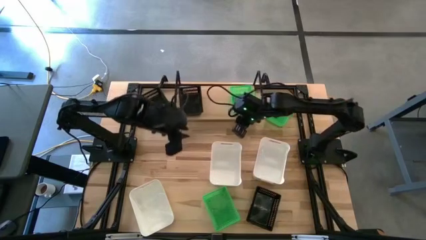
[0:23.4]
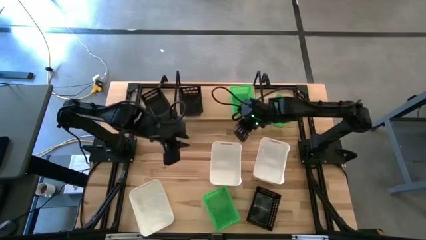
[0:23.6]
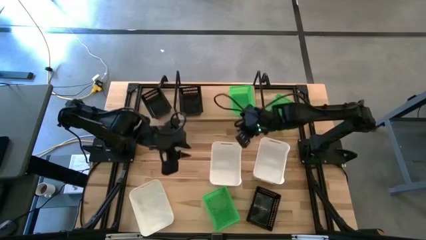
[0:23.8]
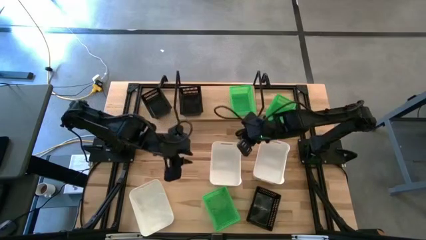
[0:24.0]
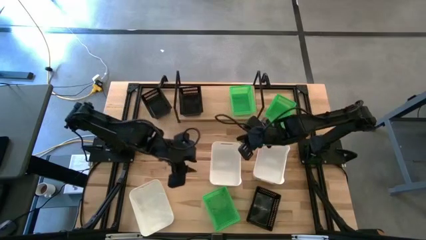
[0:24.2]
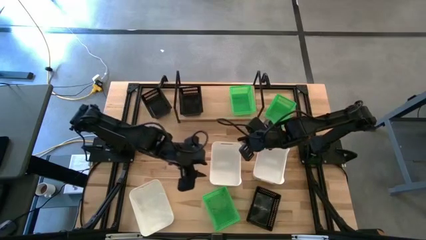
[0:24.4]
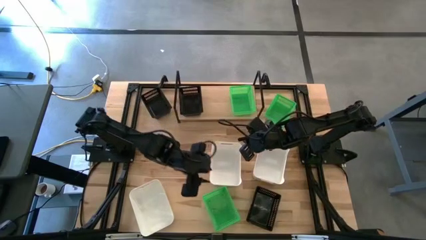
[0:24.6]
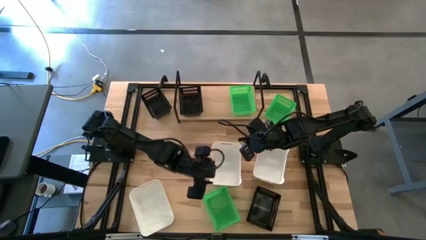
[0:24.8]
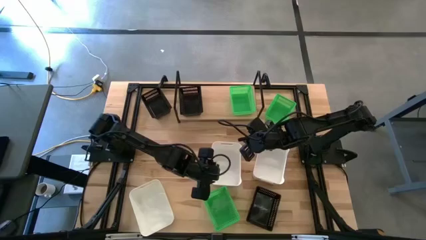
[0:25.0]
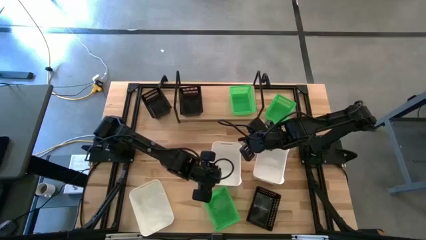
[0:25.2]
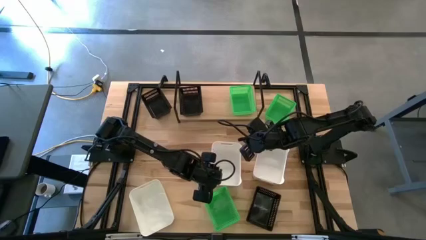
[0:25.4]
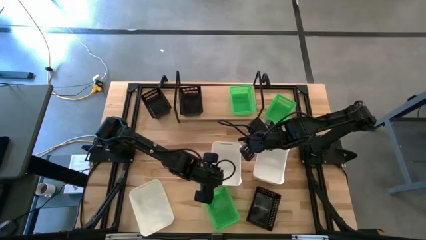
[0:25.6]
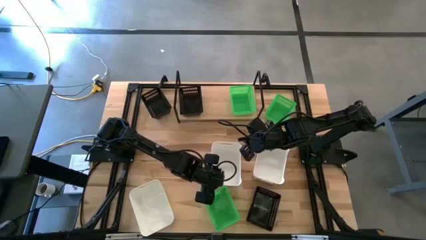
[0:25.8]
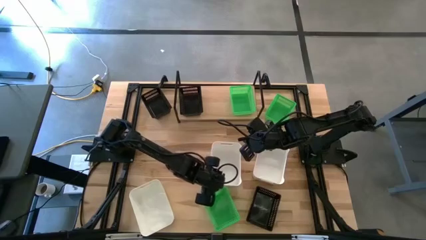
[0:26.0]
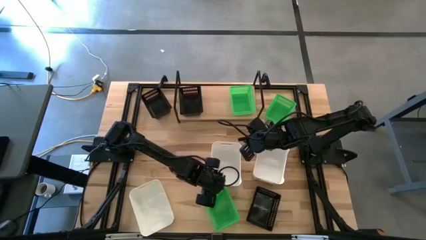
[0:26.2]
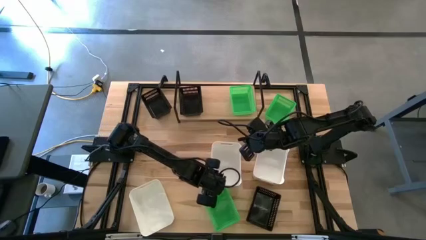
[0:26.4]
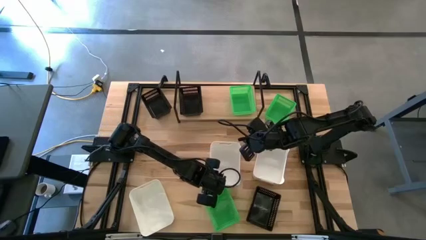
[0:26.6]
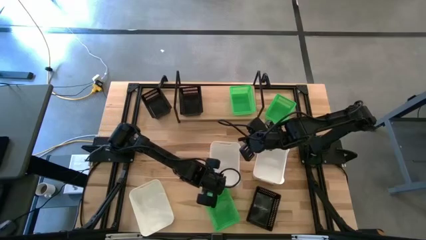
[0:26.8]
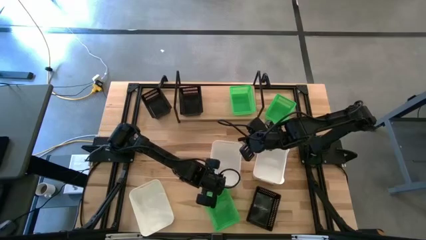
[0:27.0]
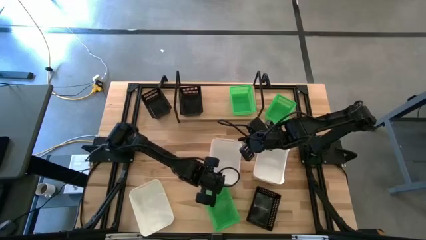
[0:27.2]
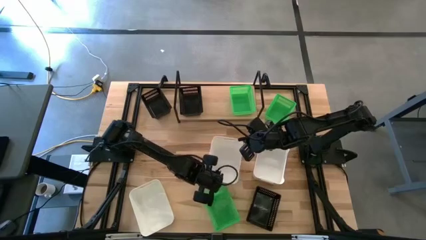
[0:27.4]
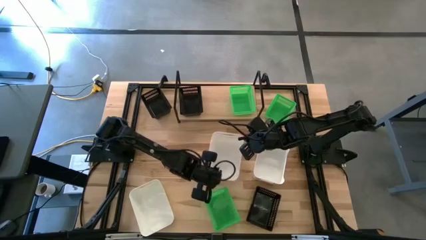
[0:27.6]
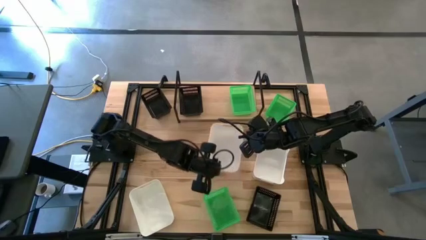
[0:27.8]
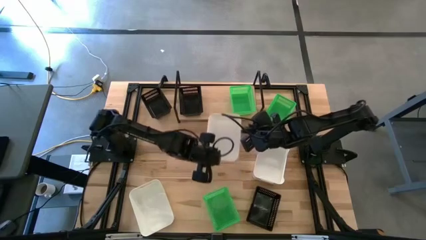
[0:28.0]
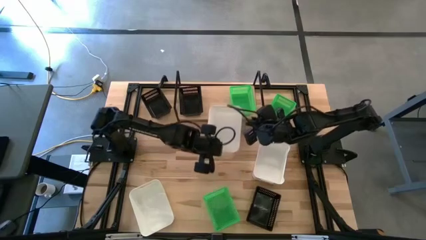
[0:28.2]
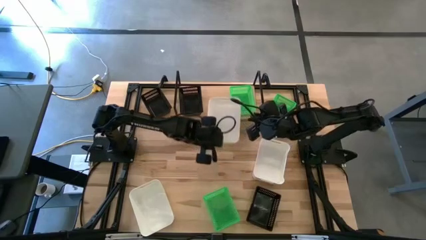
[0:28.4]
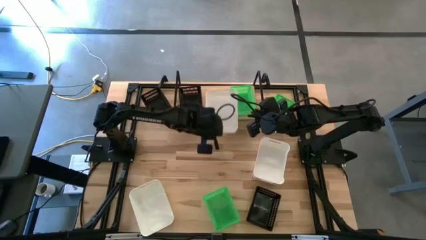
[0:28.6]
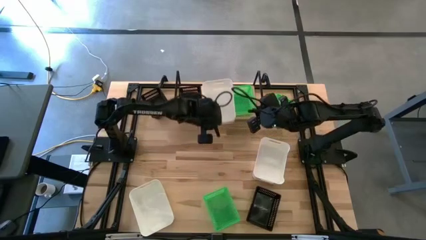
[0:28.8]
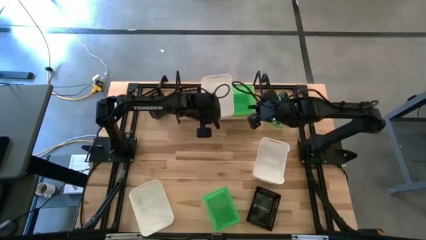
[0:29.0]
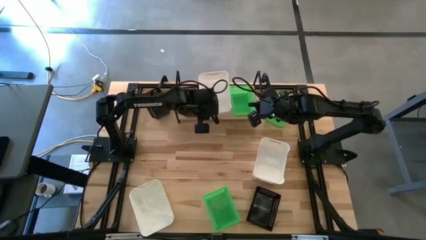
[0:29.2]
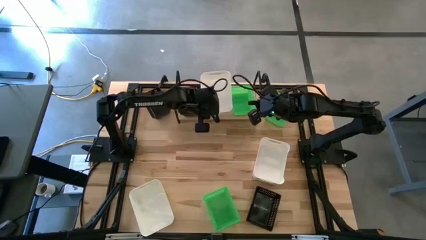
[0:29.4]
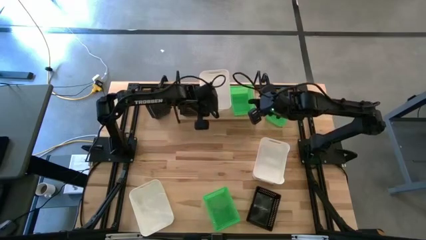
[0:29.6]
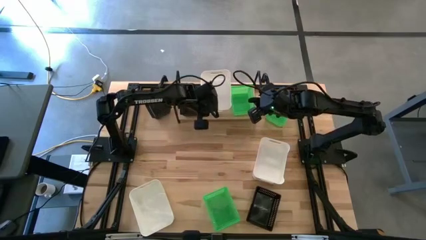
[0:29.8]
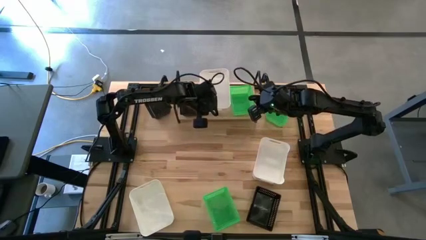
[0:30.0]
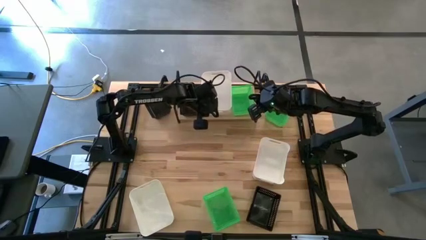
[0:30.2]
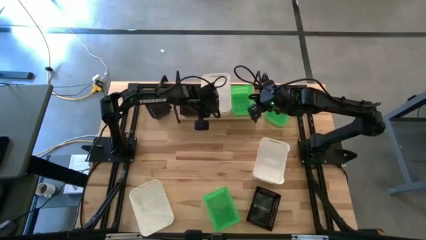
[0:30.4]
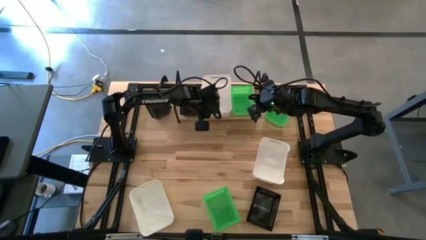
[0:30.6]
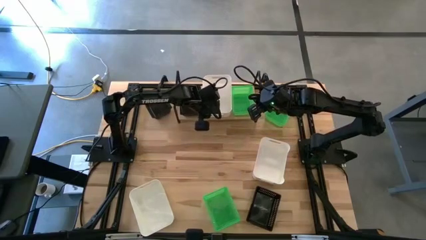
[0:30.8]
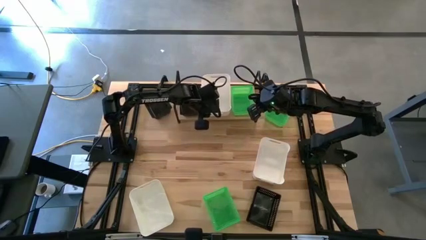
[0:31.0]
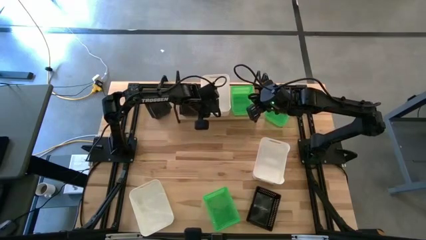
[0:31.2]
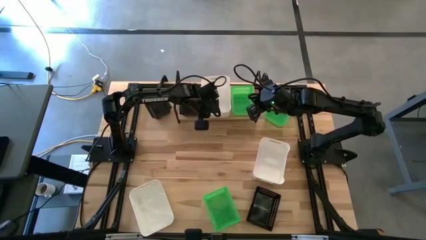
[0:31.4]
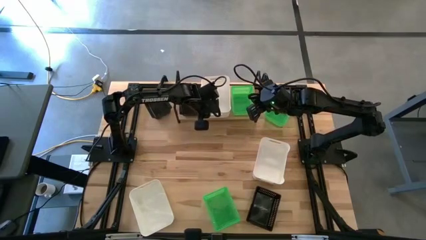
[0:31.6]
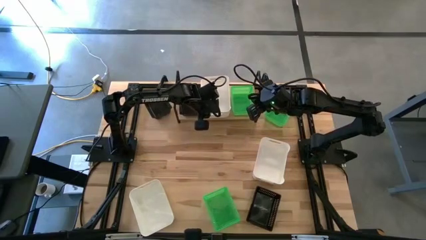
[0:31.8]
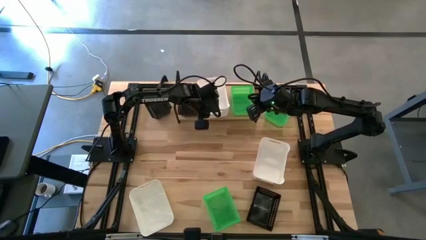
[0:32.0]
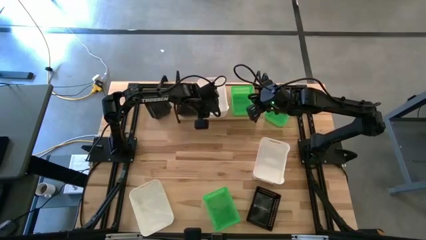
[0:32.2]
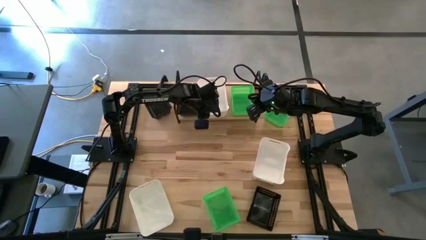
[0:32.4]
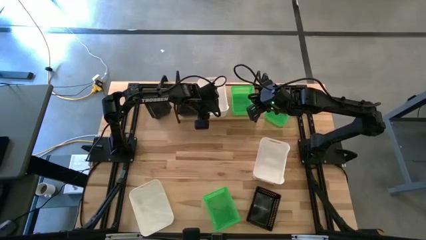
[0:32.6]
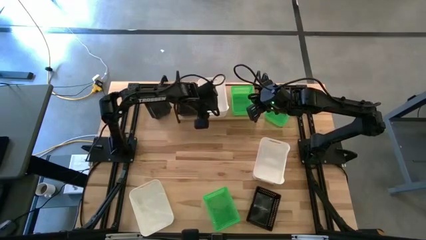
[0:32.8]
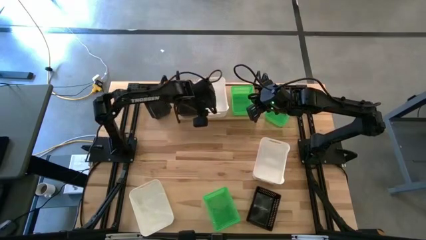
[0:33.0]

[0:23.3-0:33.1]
Task: Stack baskets on shelf by color
Put the middle left white bin on the shelf

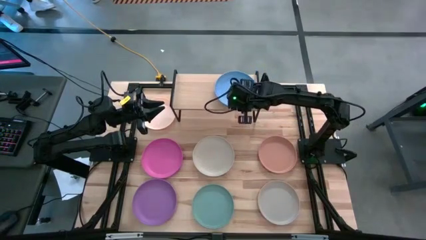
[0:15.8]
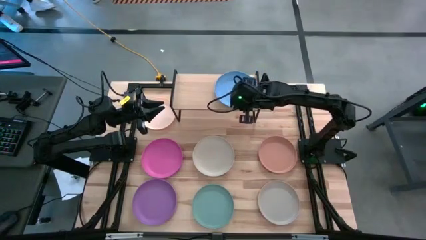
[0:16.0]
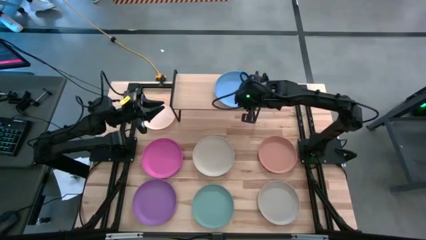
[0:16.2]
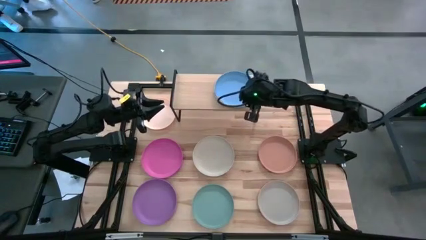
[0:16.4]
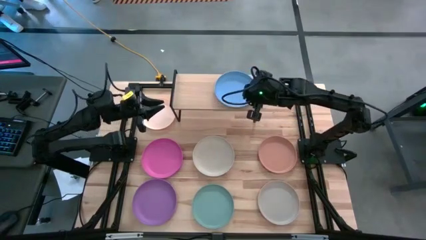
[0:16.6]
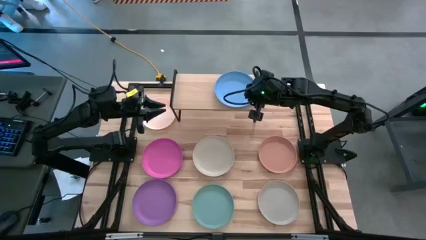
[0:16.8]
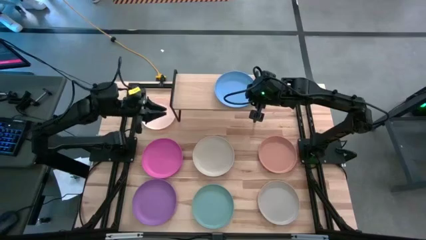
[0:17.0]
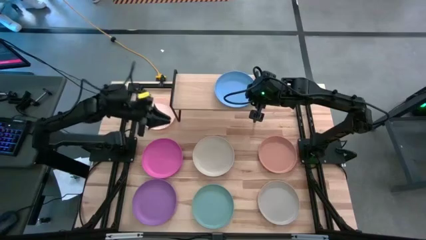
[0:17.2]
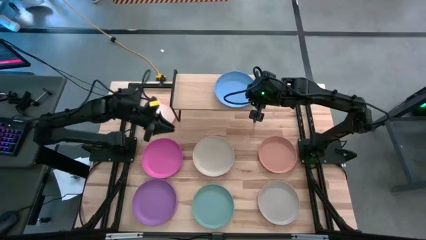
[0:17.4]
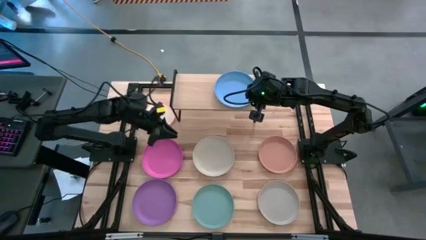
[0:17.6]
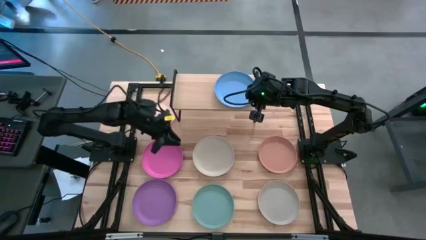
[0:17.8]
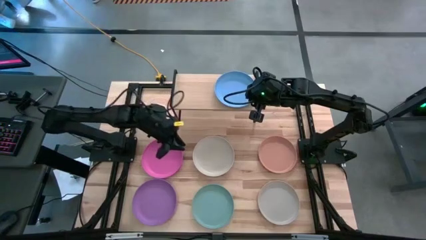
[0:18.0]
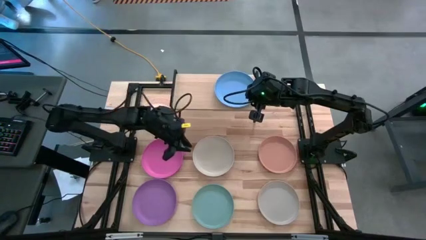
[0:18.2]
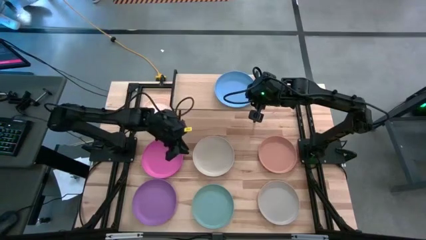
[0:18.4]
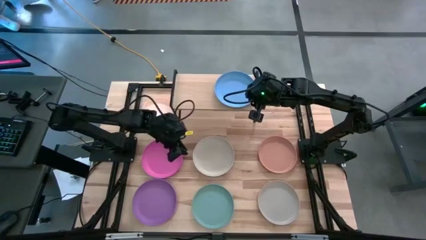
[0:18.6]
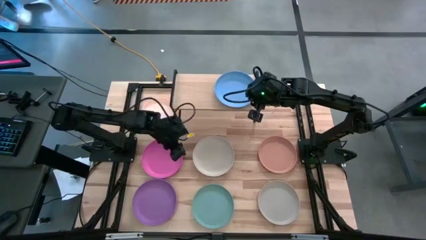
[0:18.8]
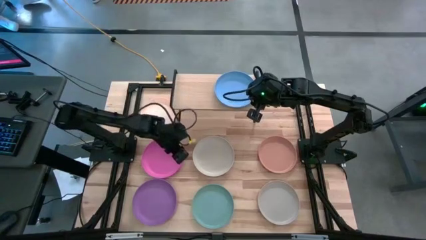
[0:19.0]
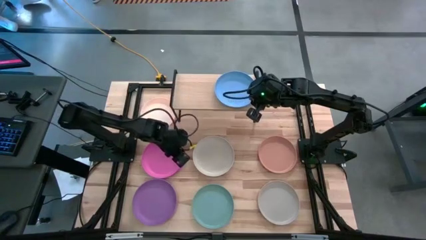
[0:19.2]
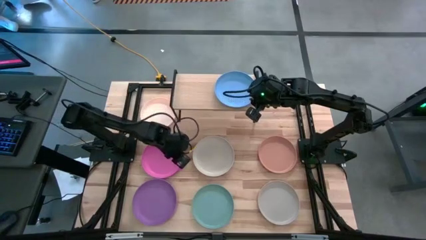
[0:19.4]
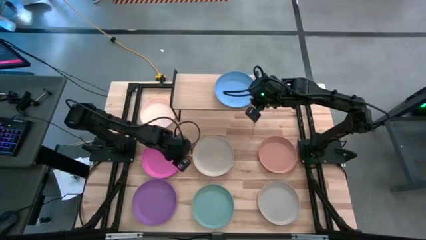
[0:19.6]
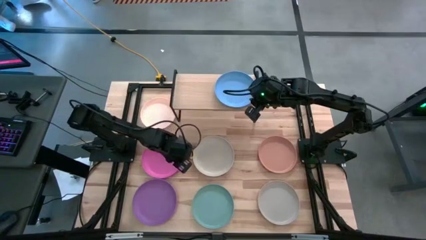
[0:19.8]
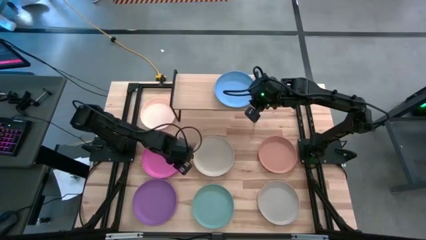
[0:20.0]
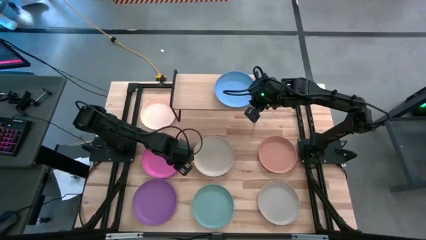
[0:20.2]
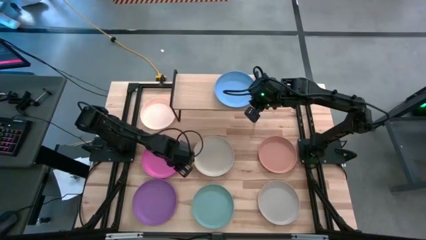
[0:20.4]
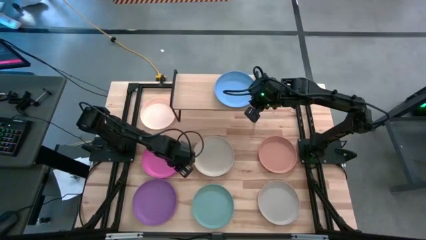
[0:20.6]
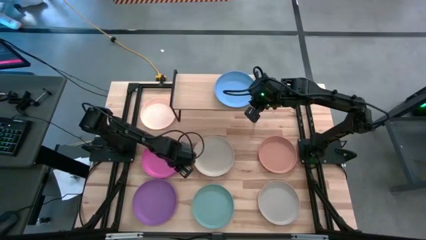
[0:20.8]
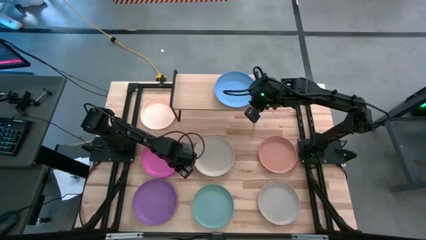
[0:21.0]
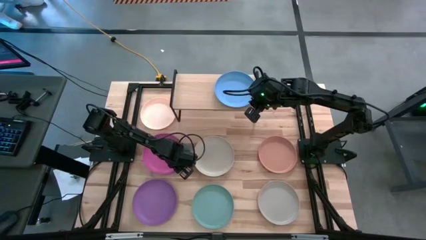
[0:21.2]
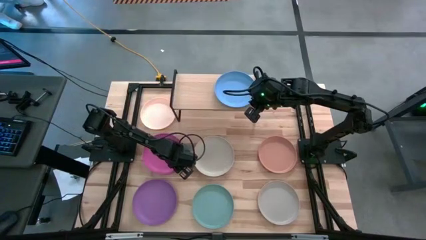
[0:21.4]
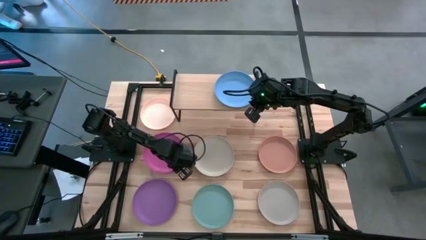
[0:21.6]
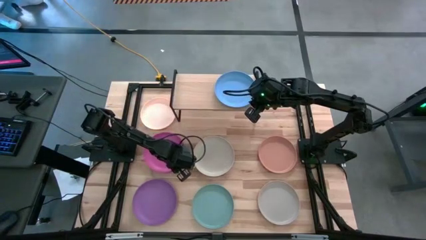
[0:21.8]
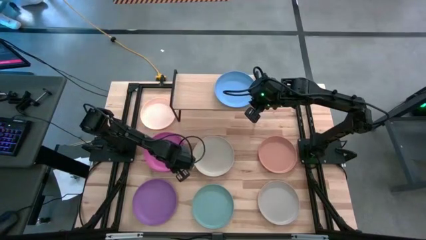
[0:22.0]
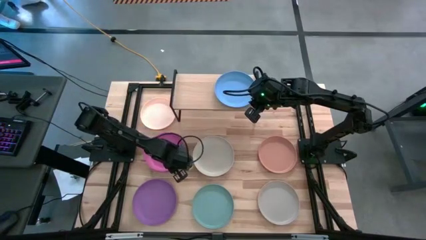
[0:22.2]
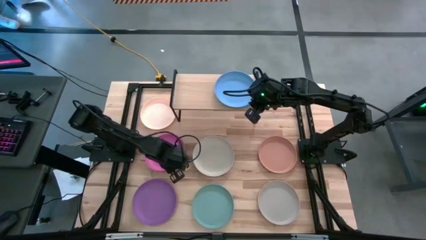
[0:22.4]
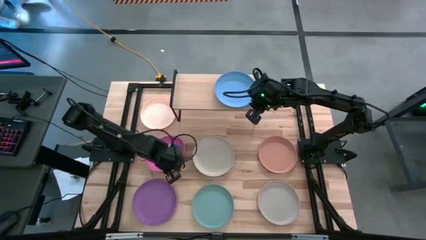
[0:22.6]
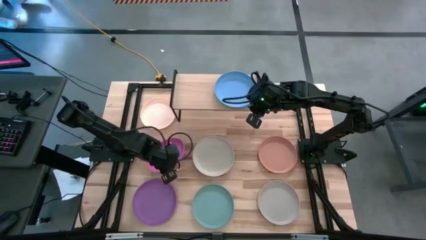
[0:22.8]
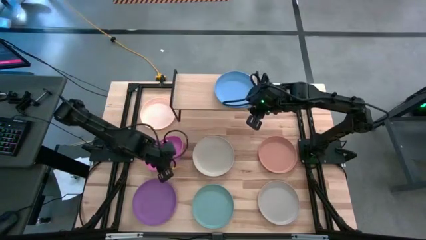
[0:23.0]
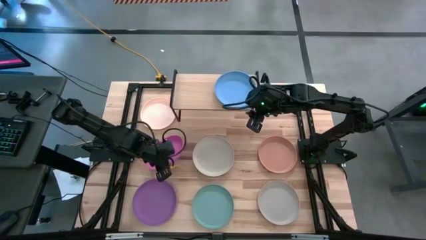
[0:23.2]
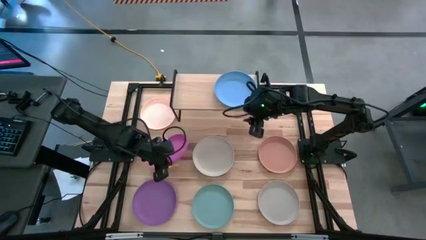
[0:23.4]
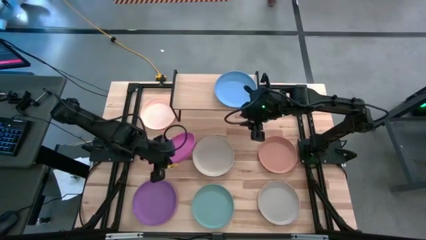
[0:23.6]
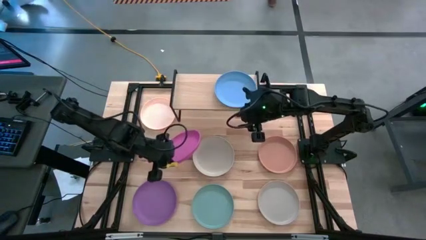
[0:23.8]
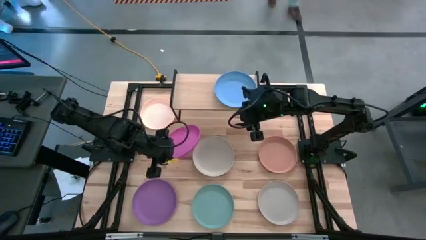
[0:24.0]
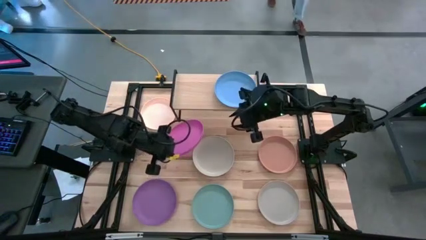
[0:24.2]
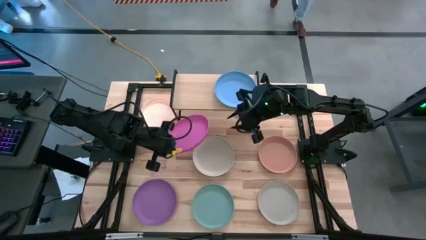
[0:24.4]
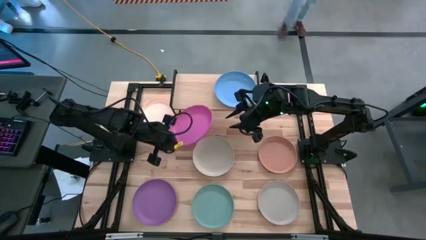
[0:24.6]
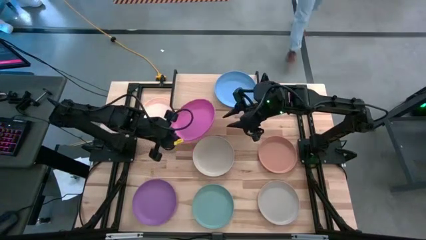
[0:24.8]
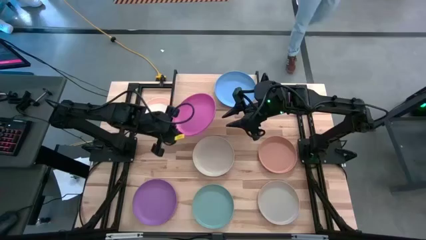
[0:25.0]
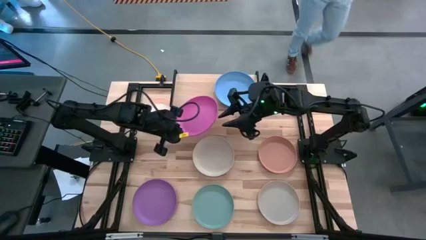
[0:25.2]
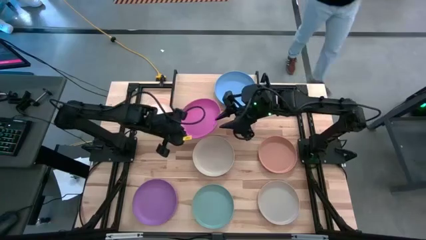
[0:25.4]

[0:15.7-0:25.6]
Task: Place and stack plates onto a shelf
Stack the pink plate on top of the blue plate on the shelf
